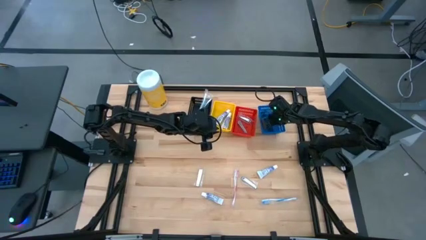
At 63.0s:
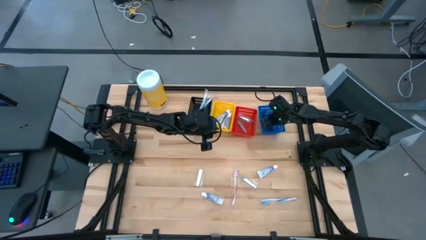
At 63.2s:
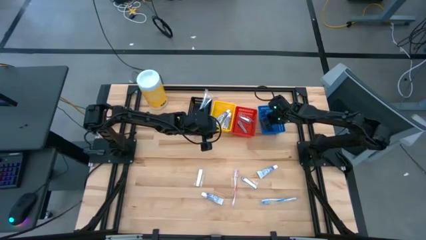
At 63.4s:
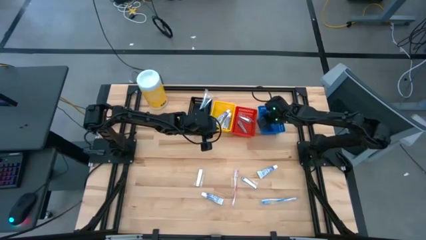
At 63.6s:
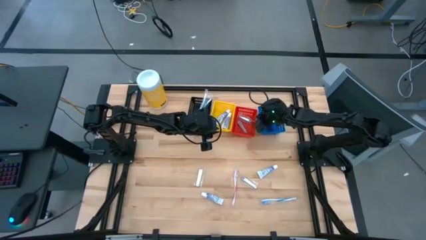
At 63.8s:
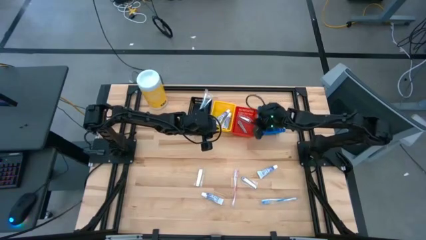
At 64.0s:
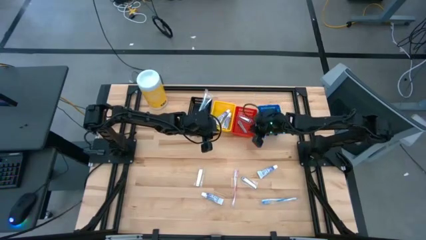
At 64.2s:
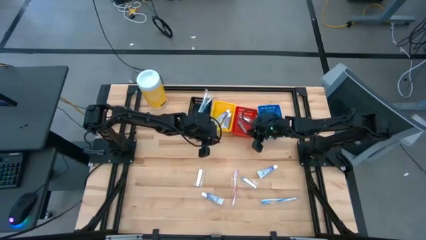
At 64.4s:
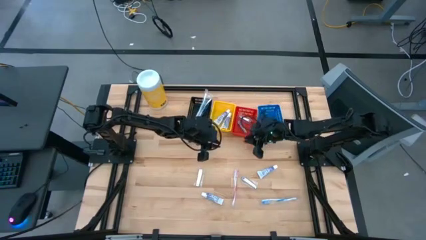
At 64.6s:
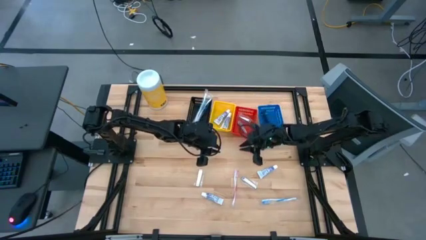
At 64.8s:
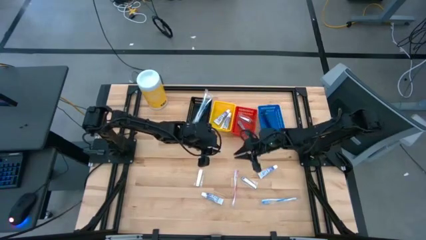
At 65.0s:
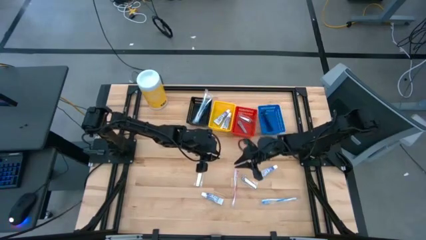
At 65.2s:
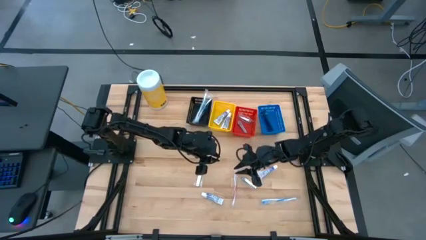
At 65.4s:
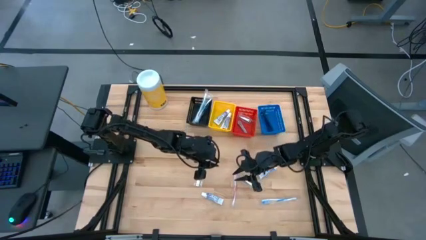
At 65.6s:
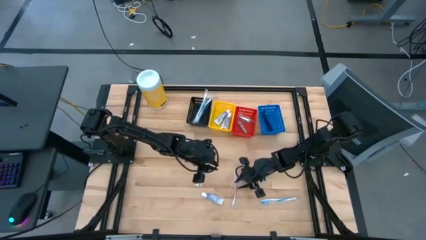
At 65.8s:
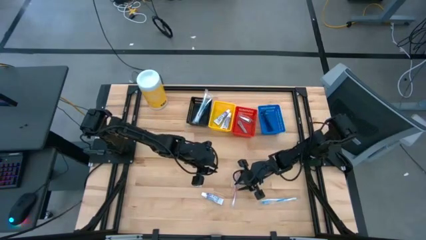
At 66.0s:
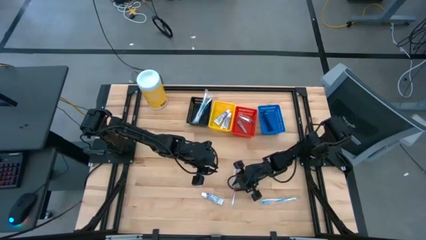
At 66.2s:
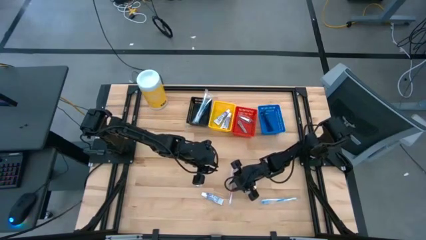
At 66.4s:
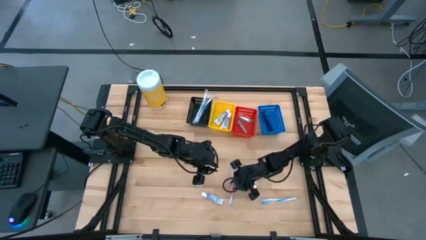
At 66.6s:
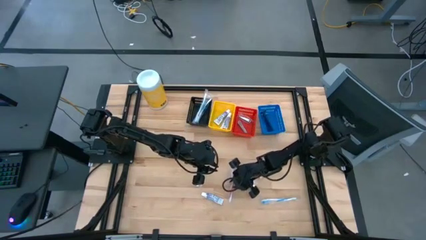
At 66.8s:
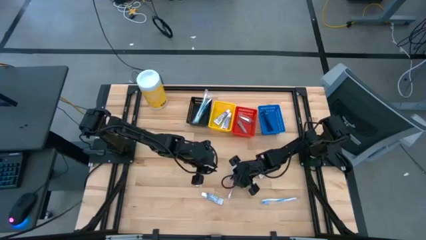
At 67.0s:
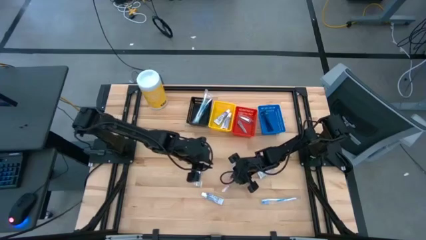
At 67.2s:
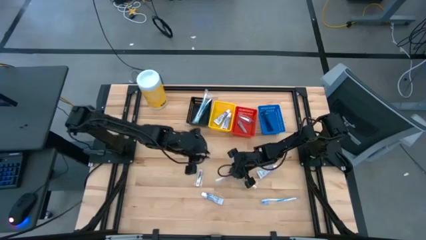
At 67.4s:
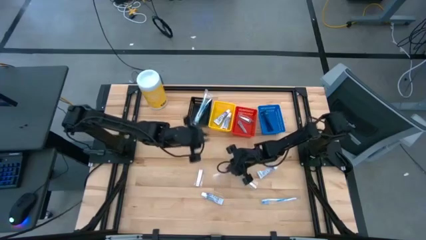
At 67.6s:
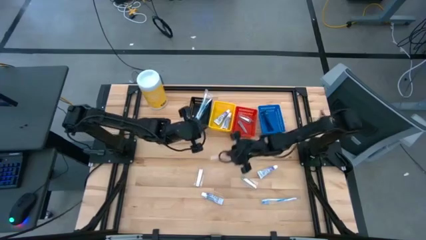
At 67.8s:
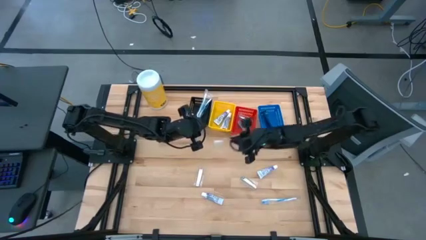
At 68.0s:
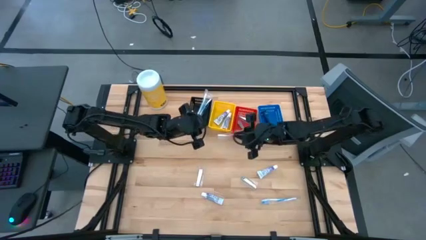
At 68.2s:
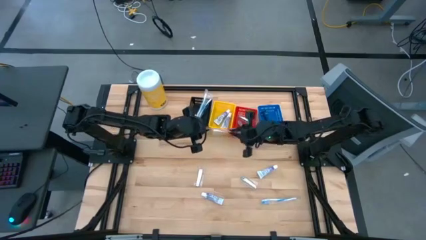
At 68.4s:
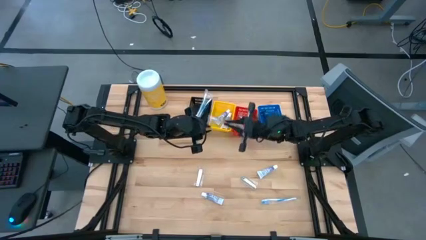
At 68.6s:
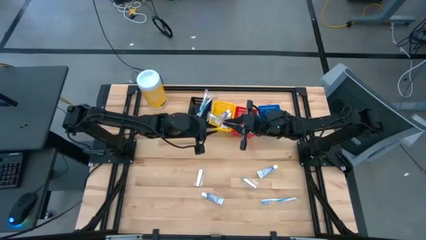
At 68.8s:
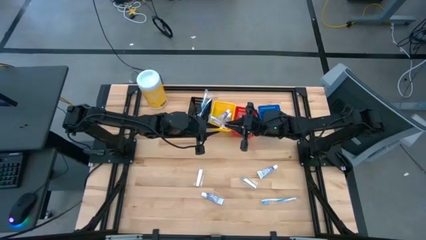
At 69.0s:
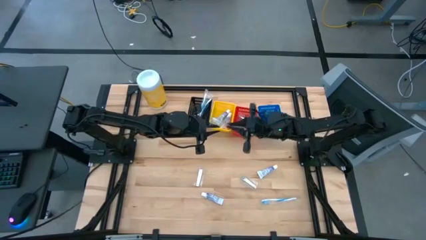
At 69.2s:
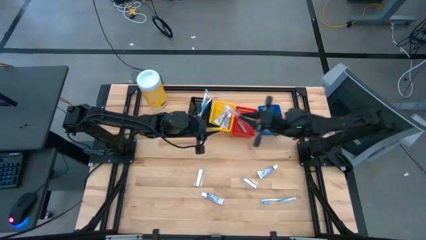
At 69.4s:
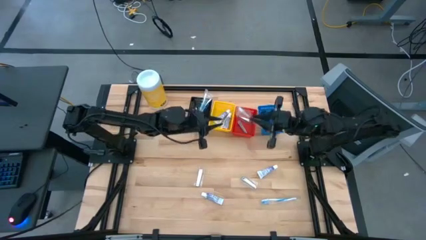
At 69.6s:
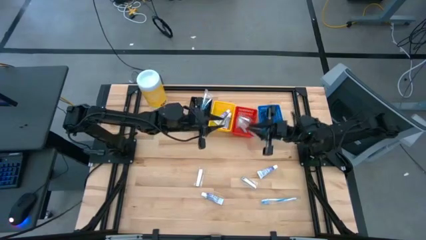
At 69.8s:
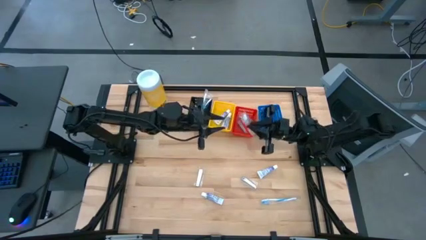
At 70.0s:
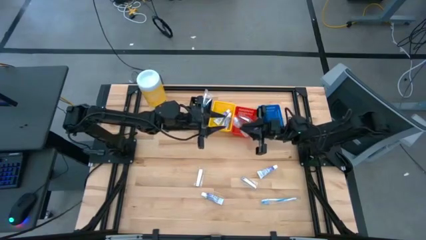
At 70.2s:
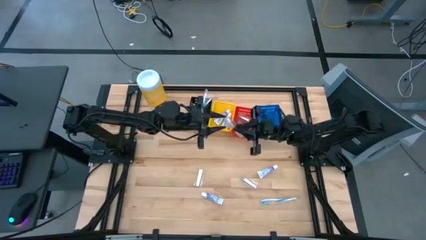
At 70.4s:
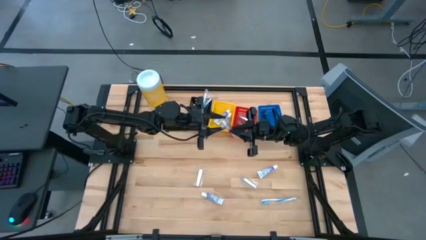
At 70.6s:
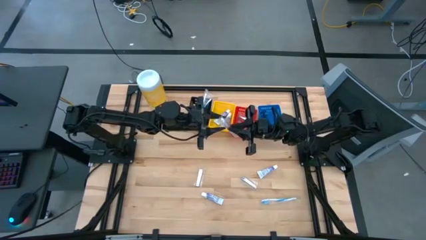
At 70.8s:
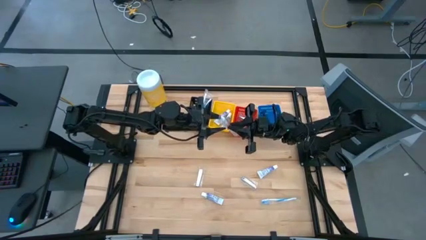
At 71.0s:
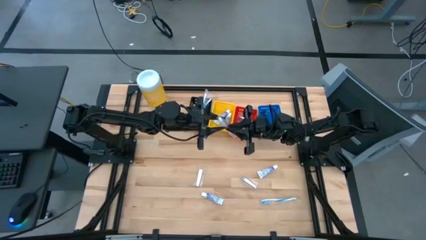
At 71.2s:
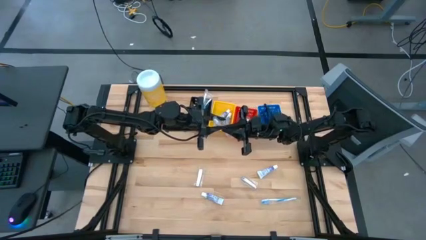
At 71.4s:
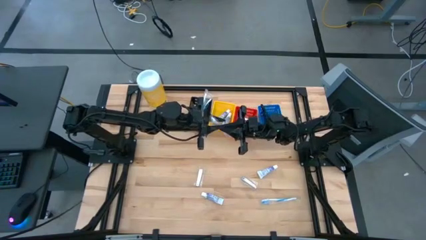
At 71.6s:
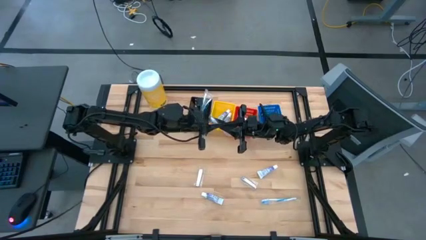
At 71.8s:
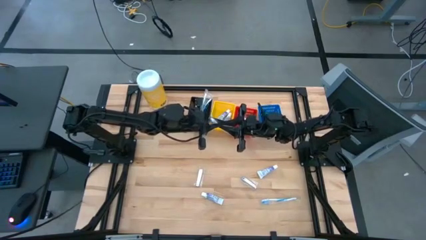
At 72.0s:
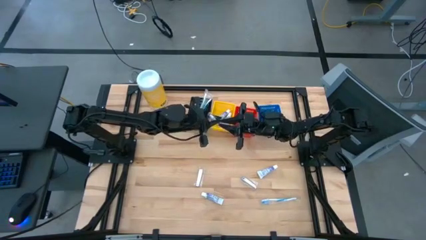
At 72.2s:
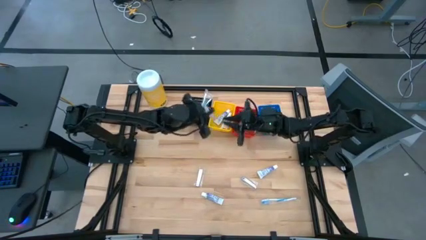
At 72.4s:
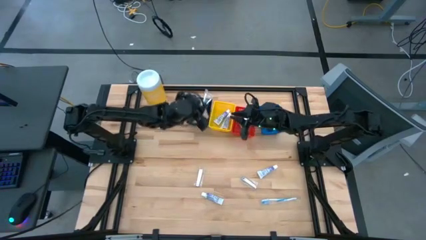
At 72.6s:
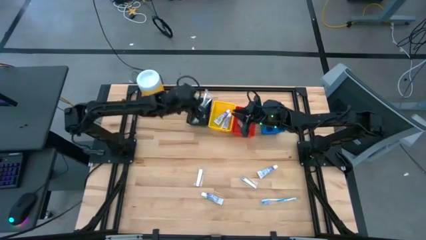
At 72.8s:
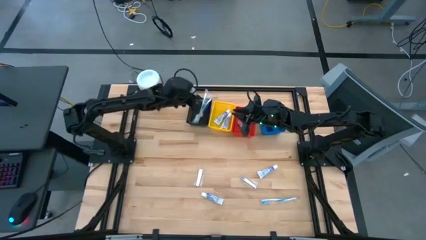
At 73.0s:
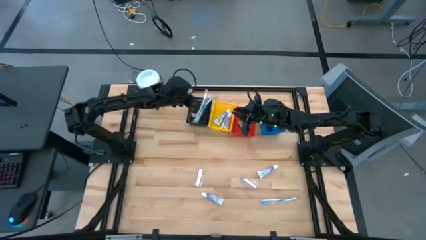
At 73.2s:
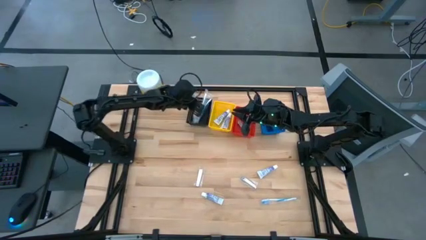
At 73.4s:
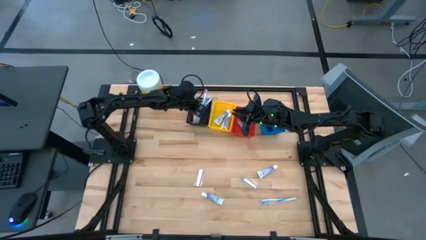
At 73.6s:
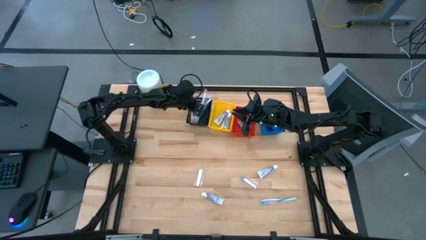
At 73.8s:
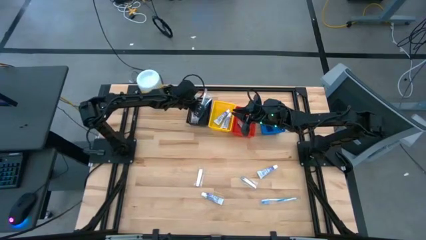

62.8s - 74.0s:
Task: Pick & Place Travel size toiletries
Put the red toothbrush into the black bin
